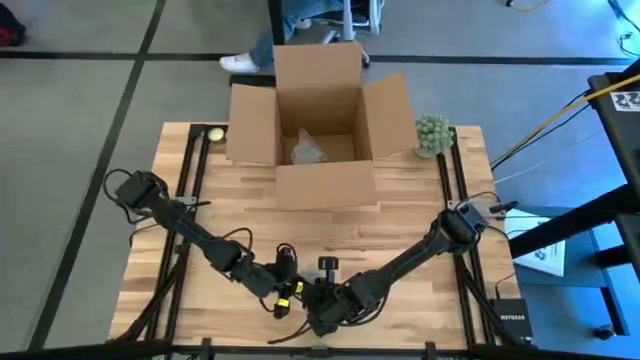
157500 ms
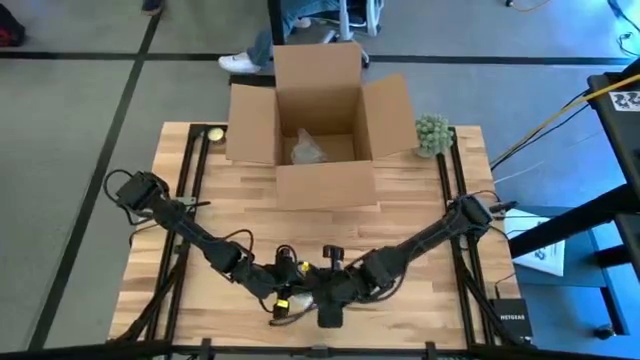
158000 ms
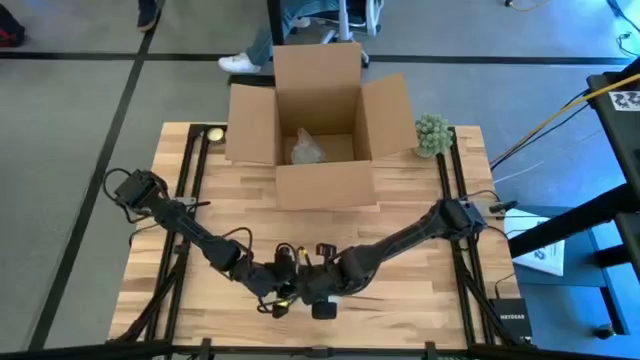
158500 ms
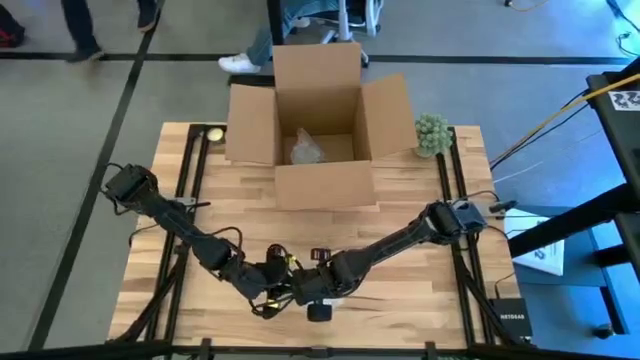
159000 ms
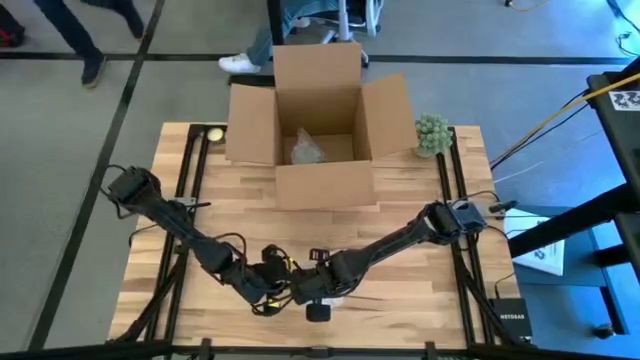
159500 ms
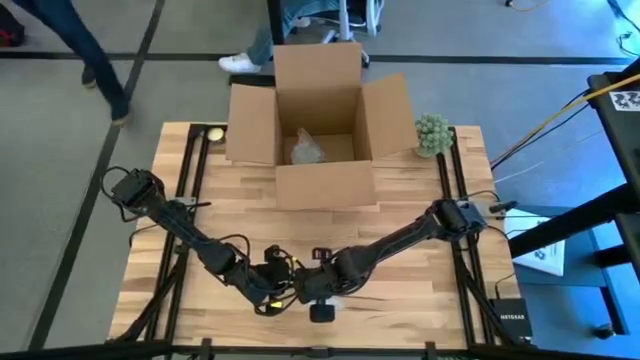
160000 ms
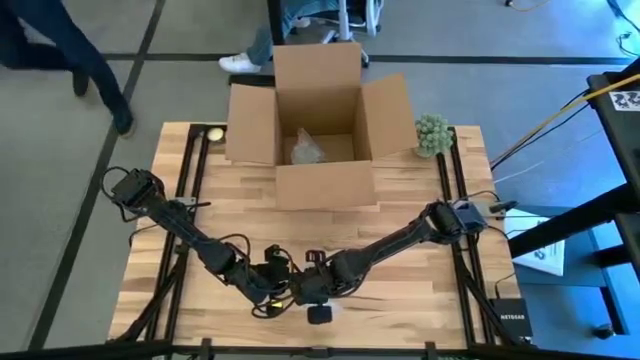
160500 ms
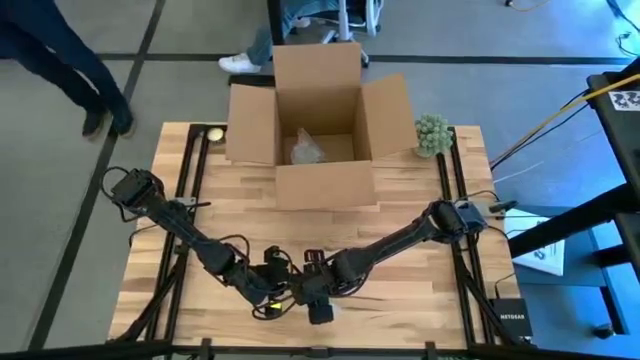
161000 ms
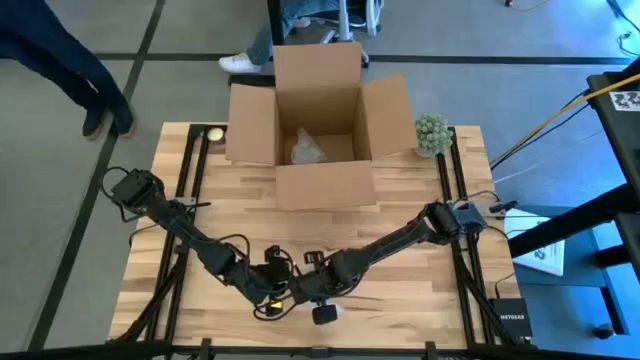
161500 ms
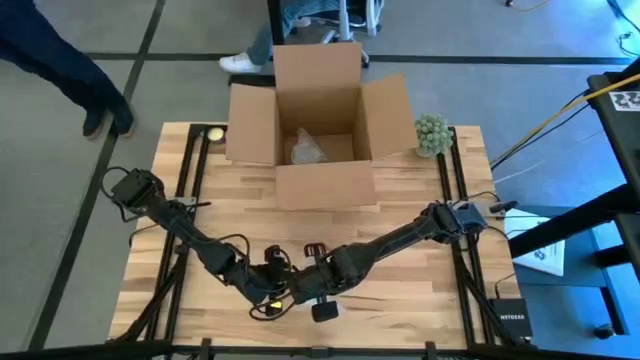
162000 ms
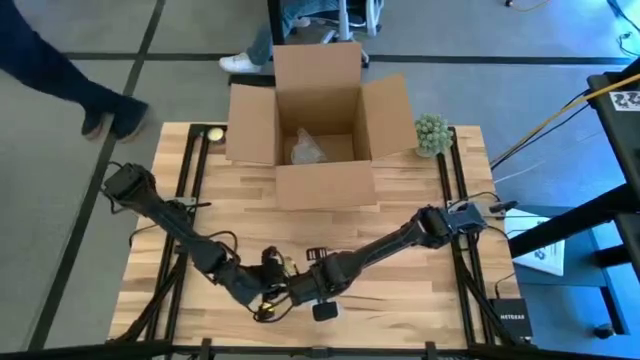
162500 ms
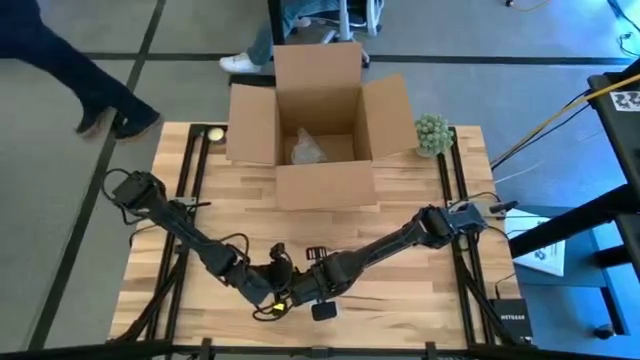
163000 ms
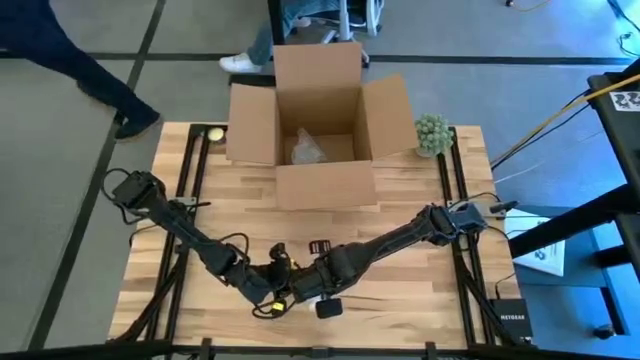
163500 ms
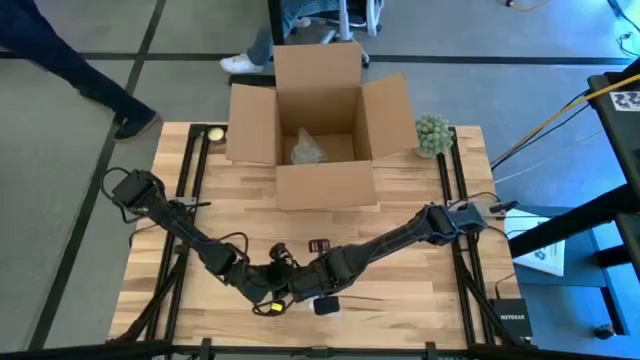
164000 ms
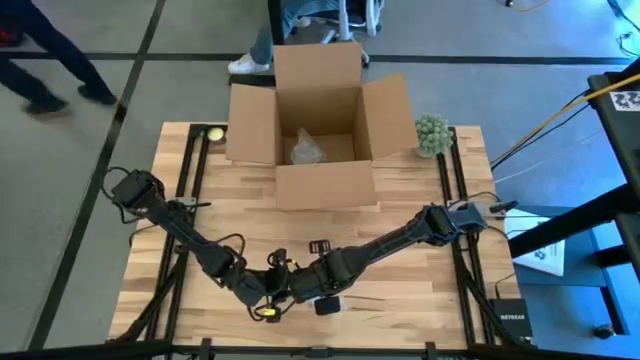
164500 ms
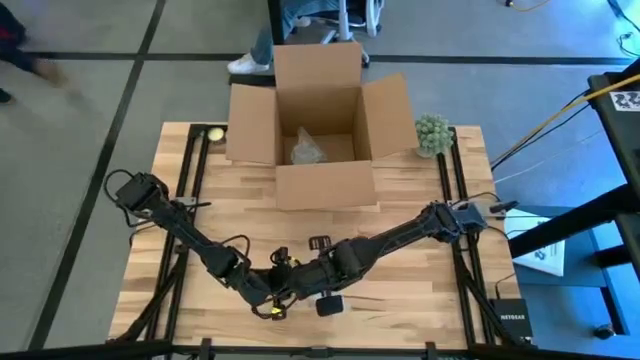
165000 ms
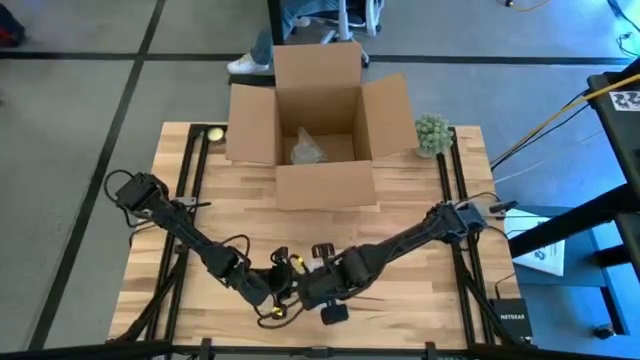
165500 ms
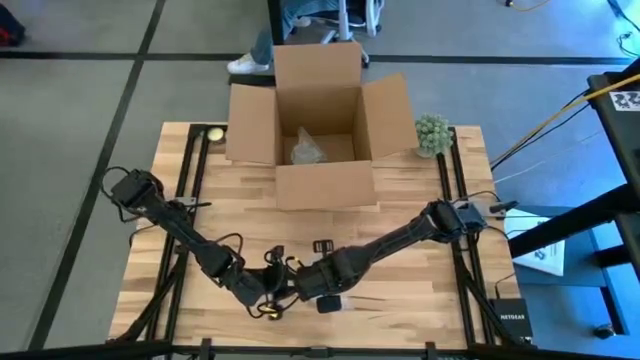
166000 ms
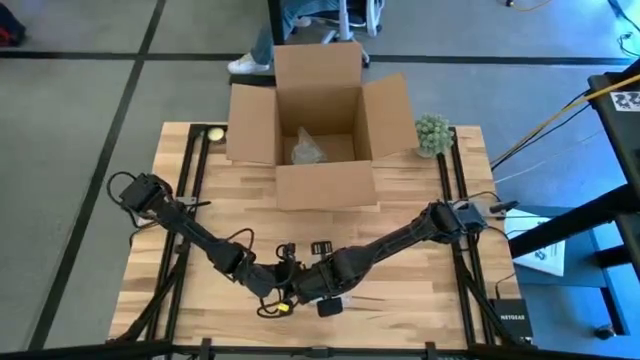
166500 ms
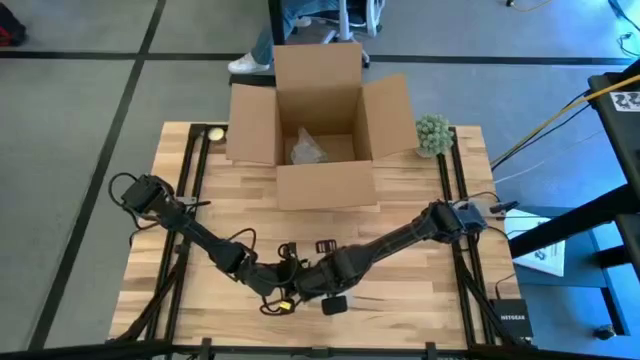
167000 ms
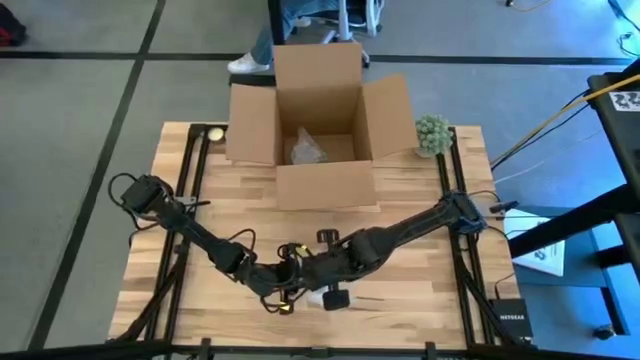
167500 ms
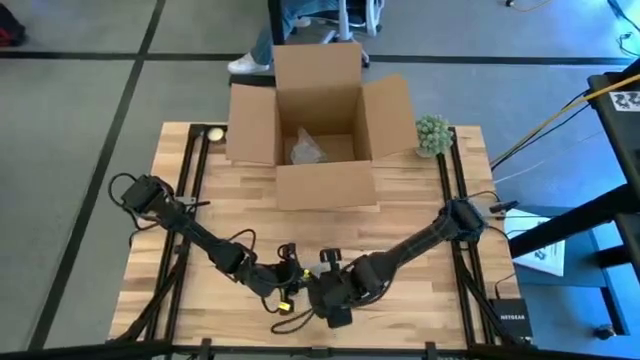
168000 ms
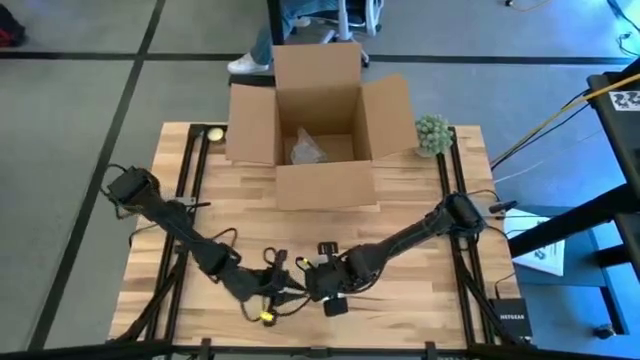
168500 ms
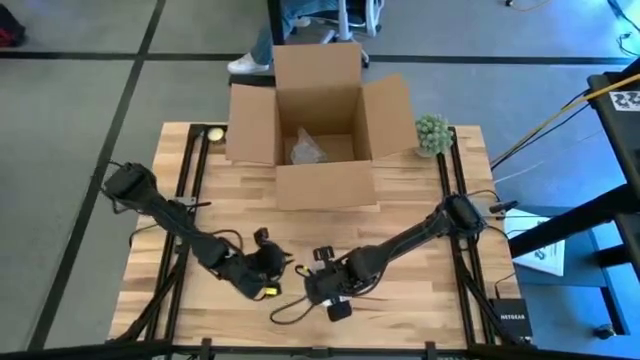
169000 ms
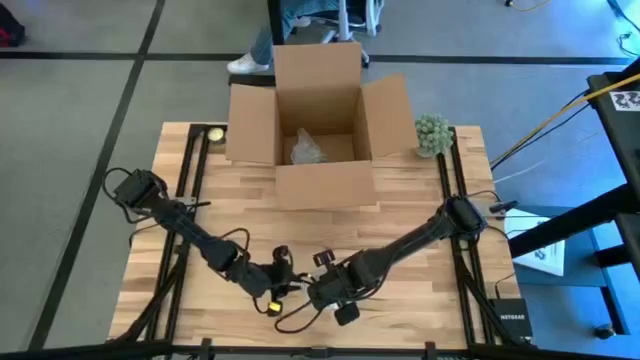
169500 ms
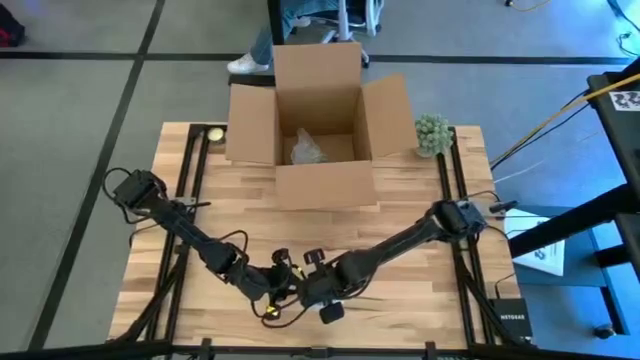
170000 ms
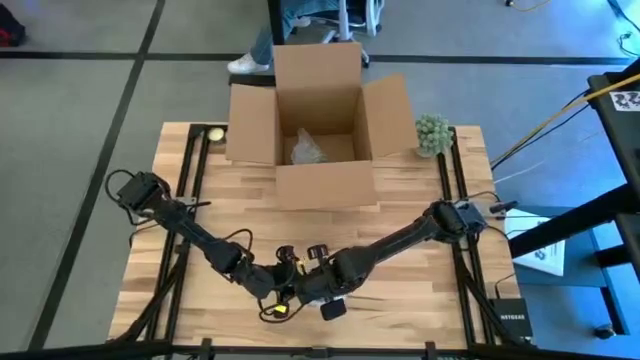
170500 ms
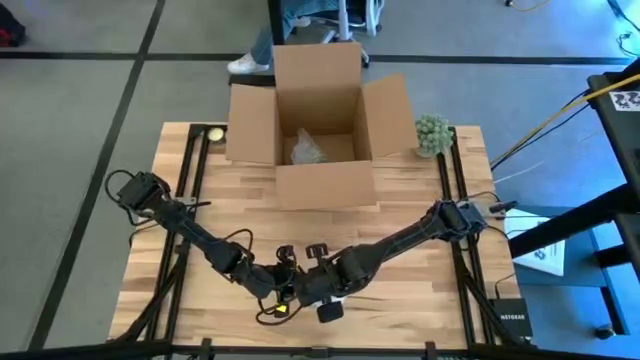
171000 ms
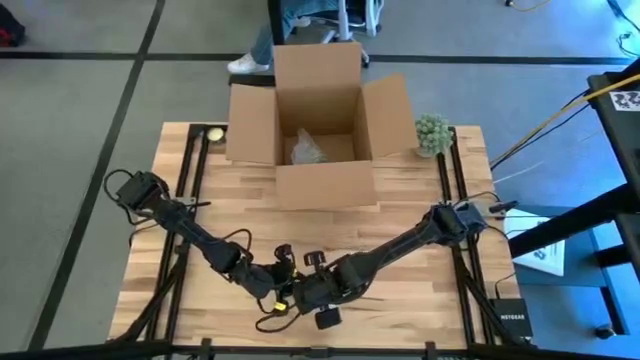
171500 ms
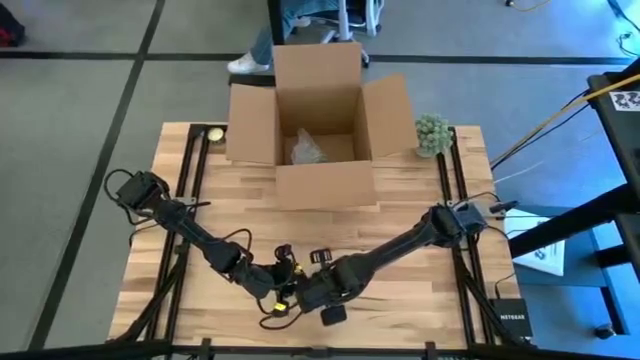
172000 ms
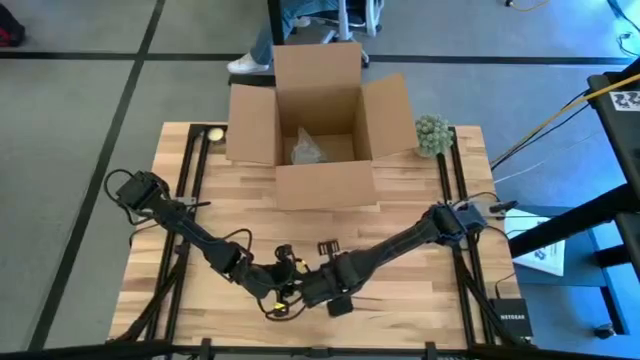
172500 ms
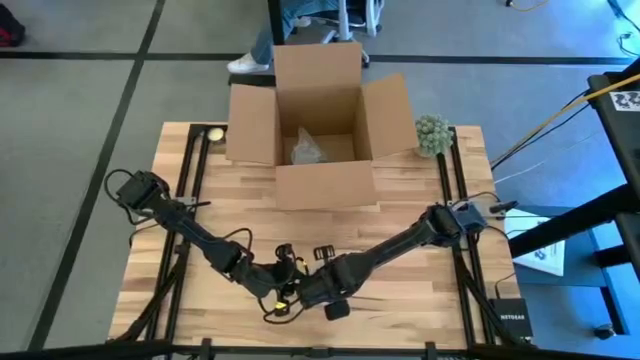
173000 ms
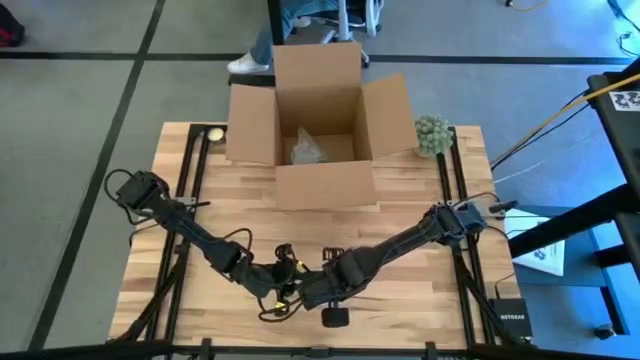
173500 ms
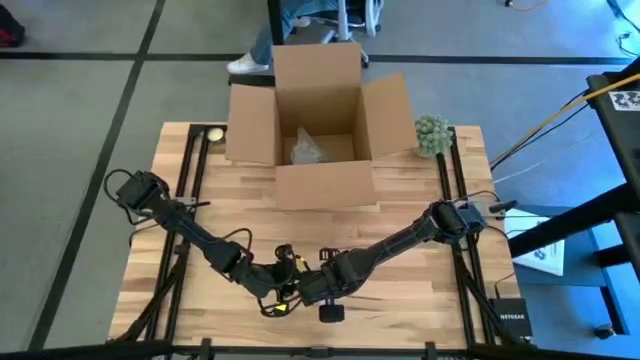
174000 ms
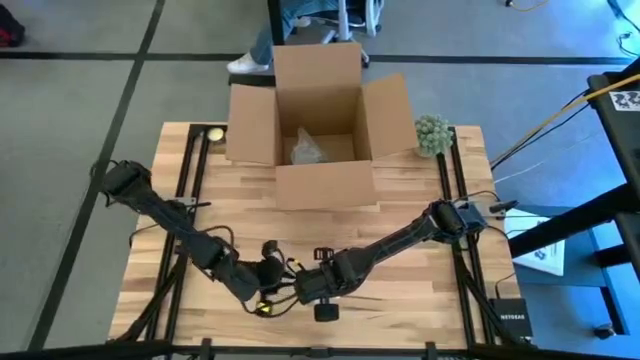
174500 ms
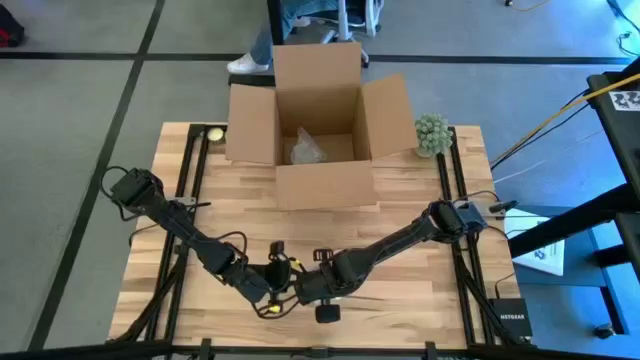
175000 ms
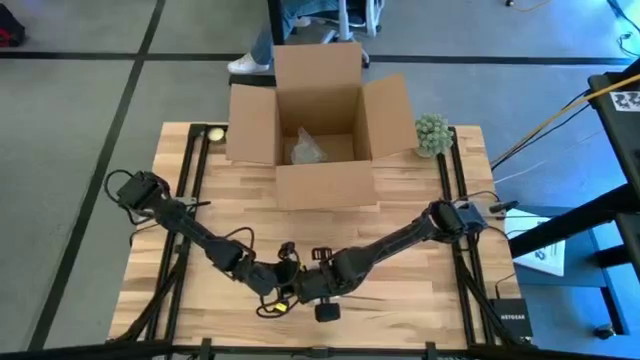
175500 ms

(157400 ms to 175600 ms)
Task: wrap mug
Wrap the white mug with bubble wrap

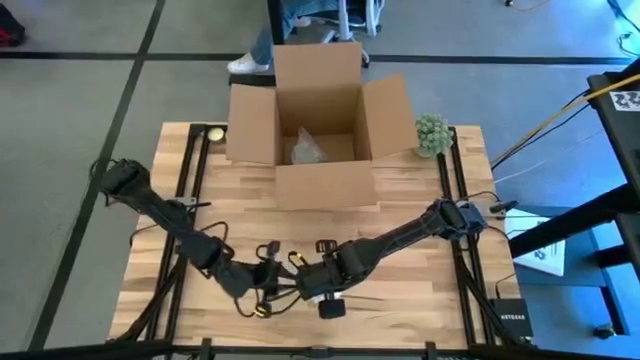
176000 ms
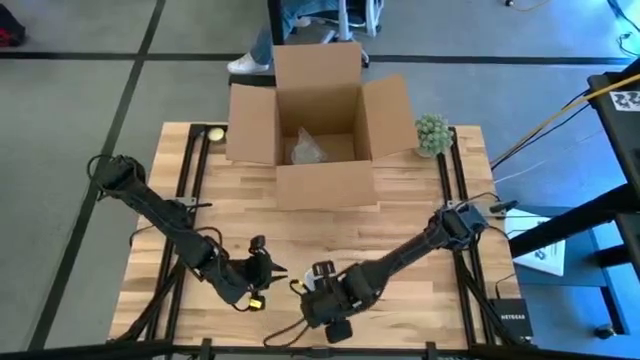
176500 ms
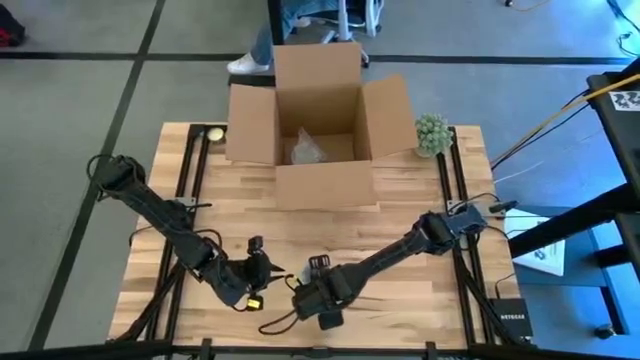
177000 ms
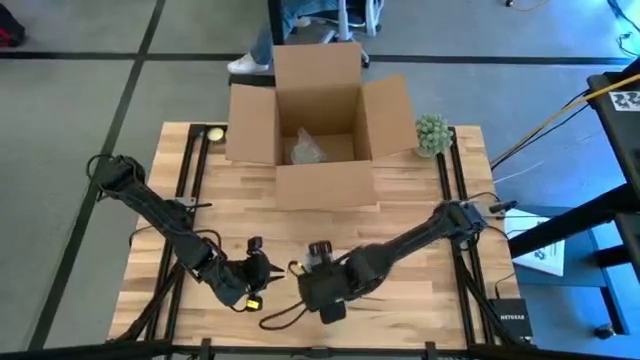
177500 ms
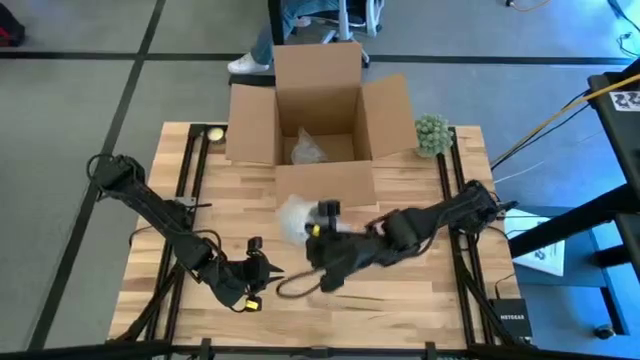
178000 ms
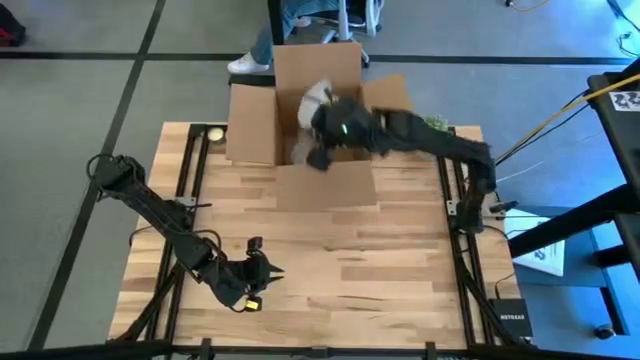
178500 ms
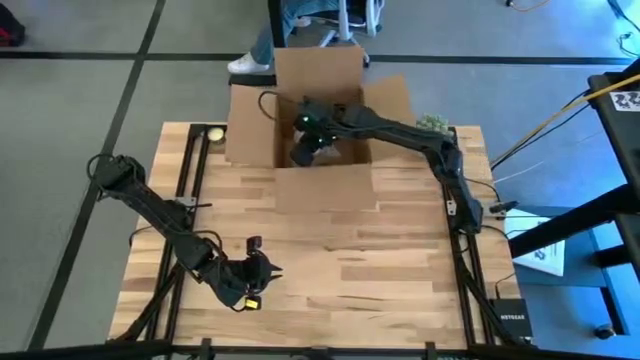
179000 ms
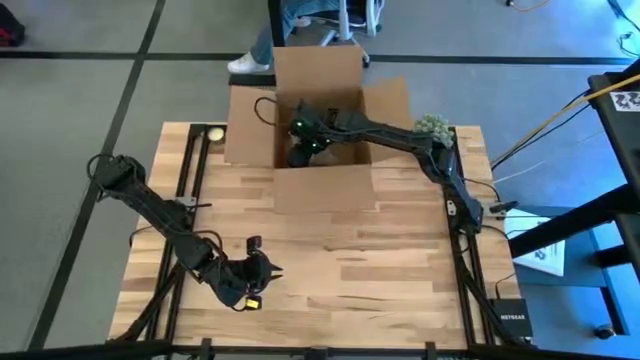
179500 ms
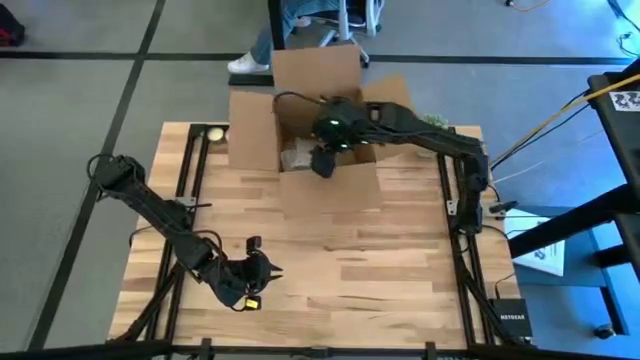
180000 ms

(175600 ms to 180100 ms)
Put the white wrapped mug into the box

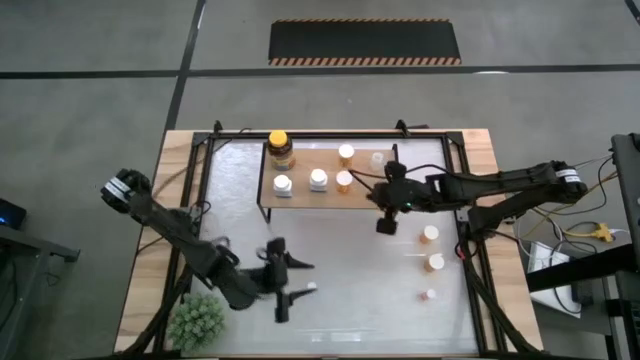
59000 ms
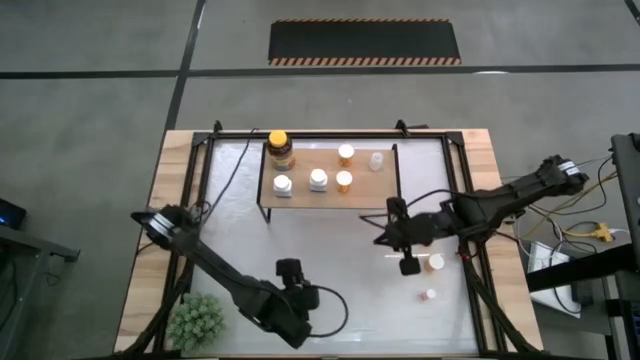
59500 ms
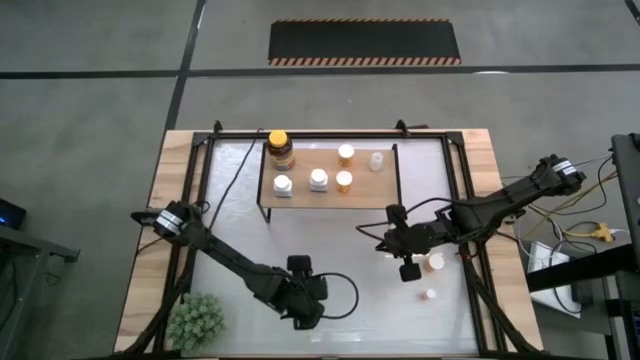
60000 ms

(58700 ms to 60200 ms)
Task: Pick and place medicine bottles onto shelf by color
Put the blue pill bottle on the shelf
